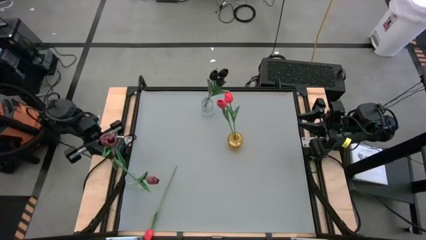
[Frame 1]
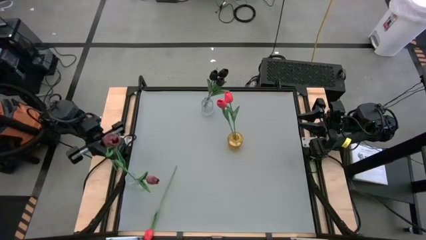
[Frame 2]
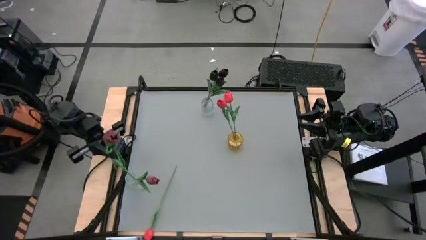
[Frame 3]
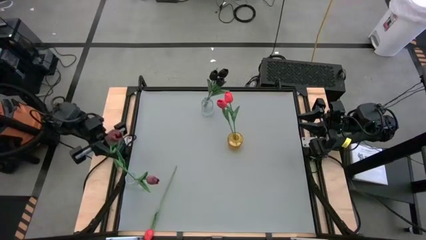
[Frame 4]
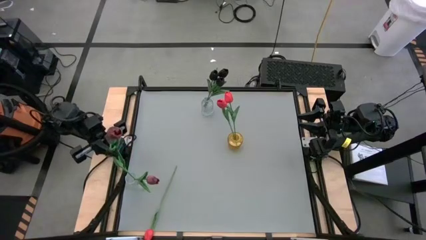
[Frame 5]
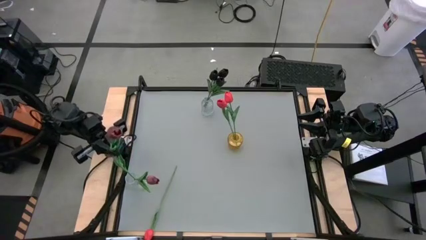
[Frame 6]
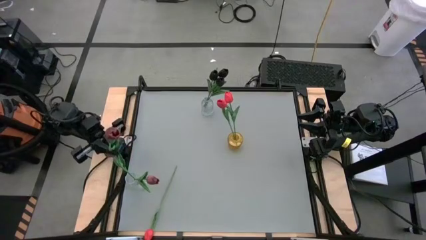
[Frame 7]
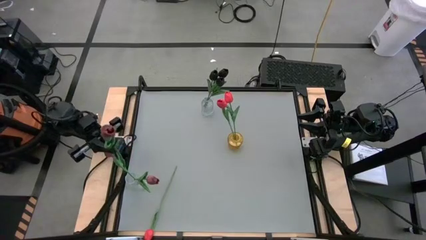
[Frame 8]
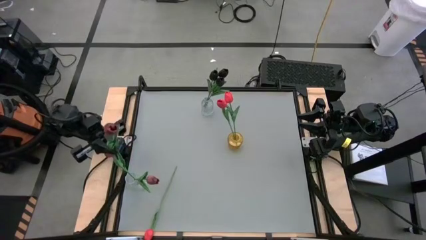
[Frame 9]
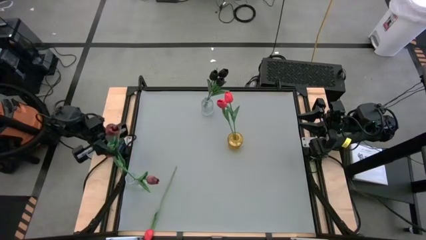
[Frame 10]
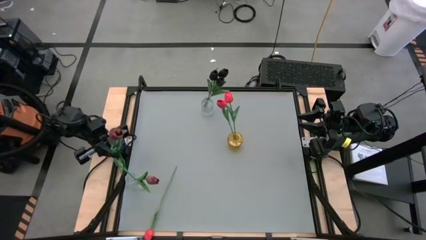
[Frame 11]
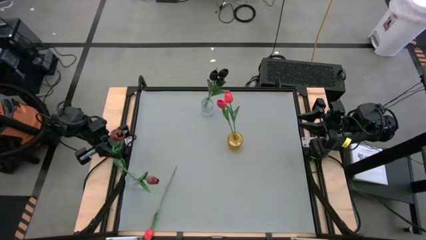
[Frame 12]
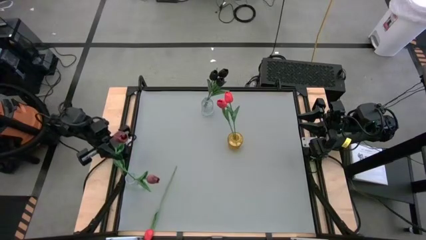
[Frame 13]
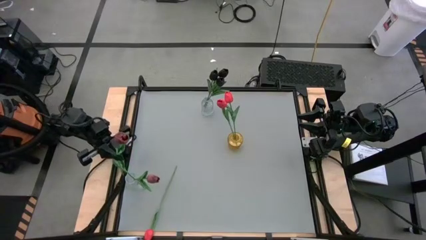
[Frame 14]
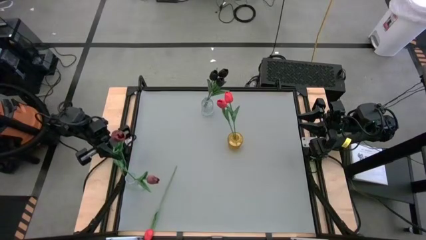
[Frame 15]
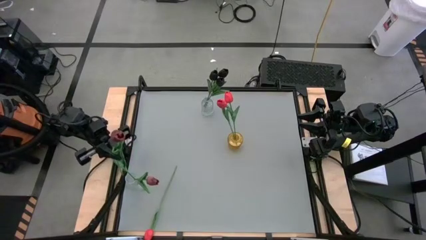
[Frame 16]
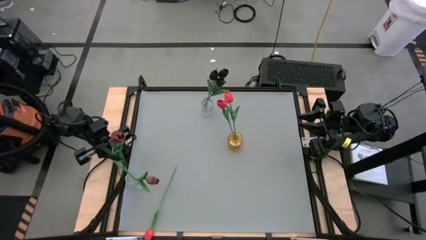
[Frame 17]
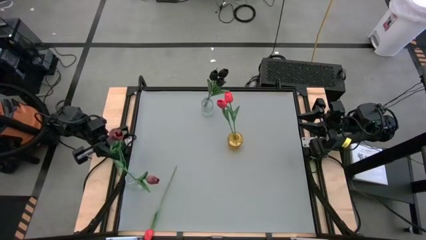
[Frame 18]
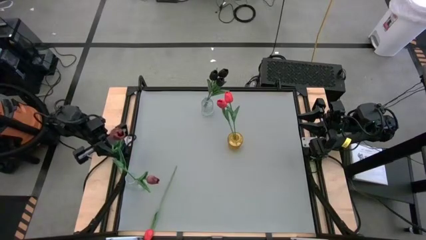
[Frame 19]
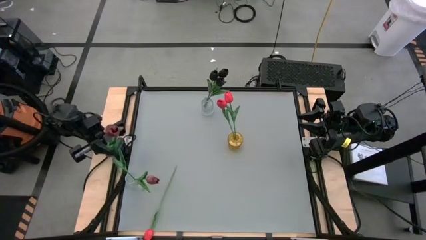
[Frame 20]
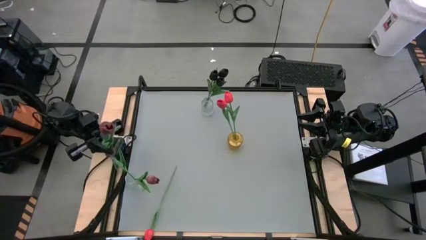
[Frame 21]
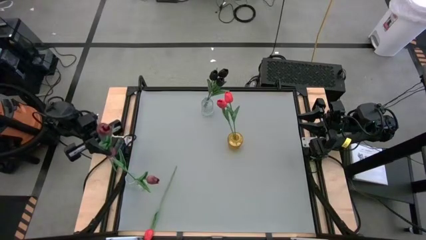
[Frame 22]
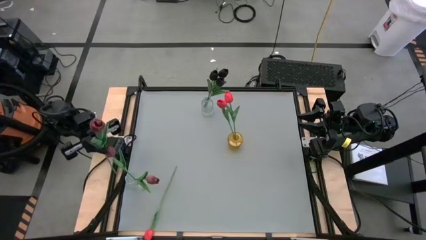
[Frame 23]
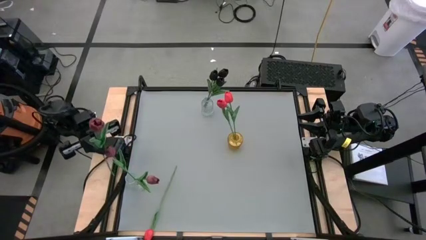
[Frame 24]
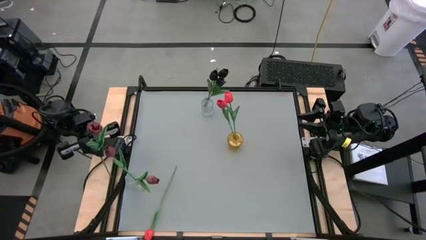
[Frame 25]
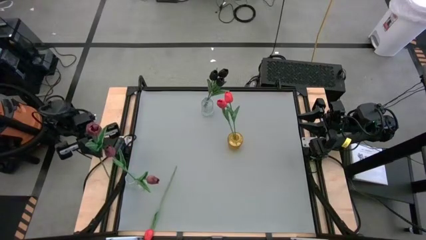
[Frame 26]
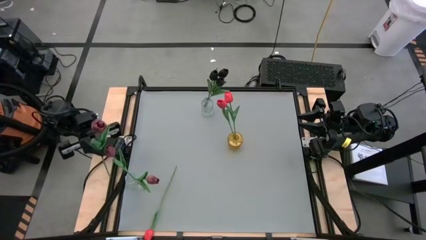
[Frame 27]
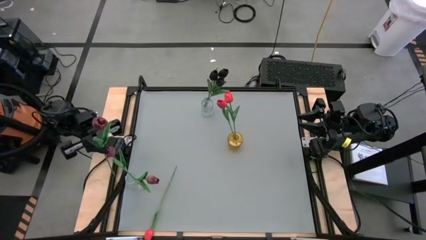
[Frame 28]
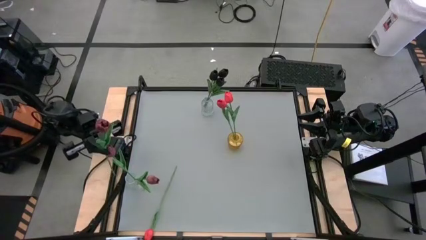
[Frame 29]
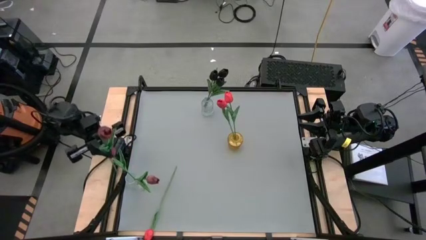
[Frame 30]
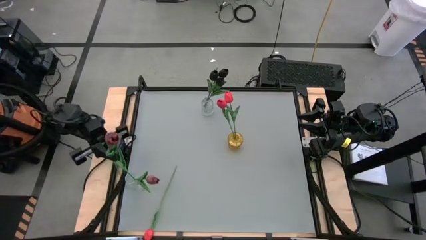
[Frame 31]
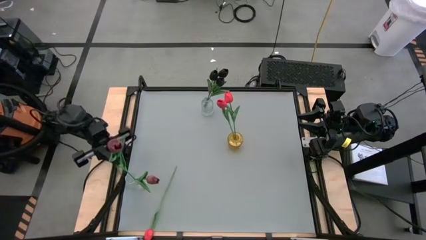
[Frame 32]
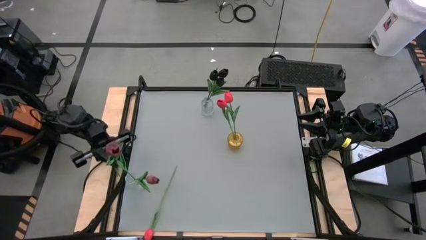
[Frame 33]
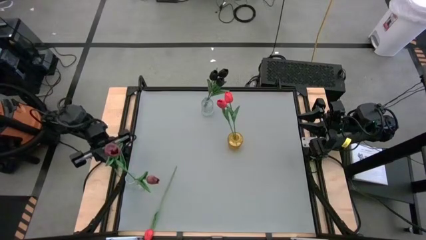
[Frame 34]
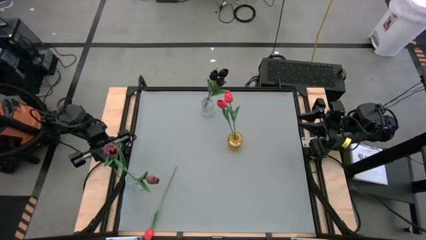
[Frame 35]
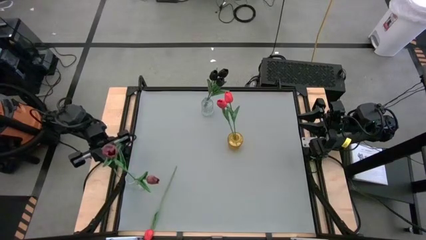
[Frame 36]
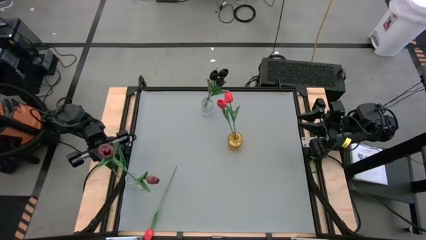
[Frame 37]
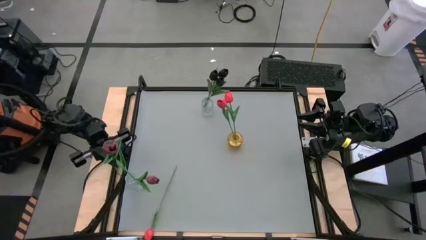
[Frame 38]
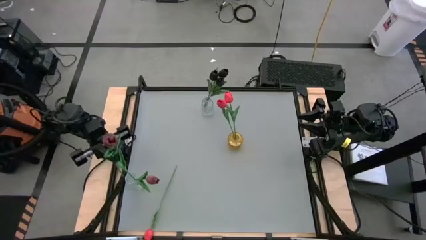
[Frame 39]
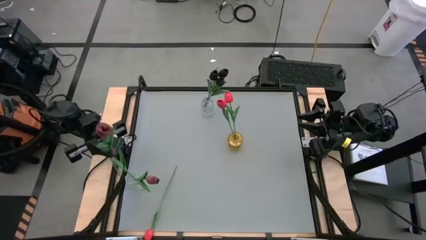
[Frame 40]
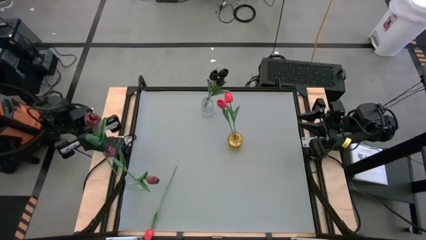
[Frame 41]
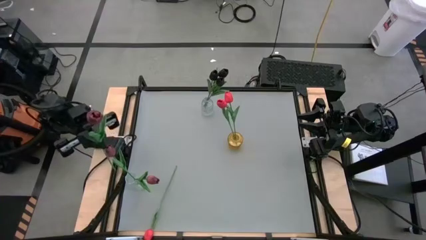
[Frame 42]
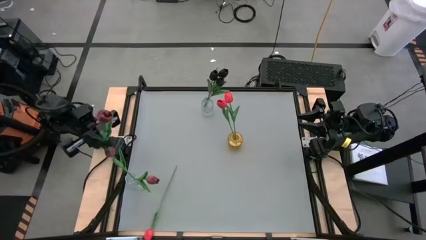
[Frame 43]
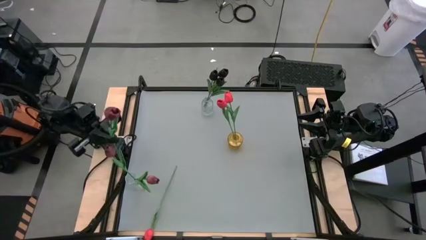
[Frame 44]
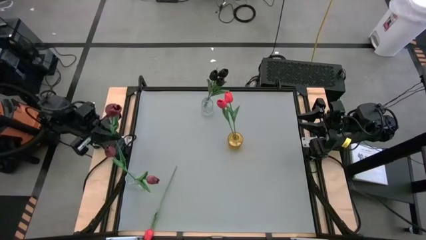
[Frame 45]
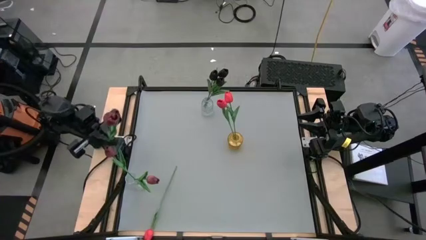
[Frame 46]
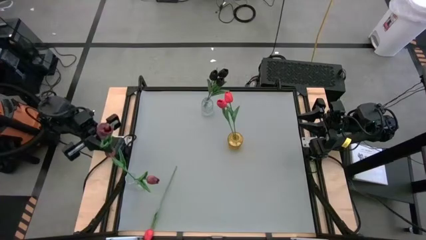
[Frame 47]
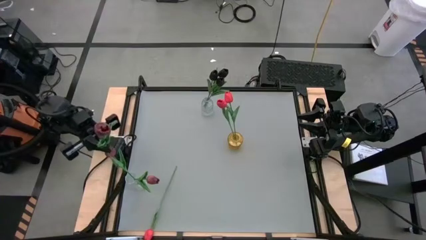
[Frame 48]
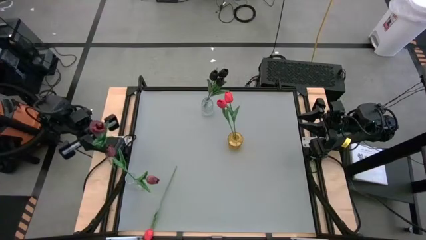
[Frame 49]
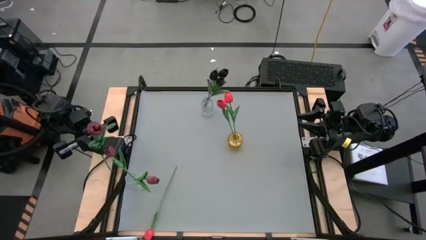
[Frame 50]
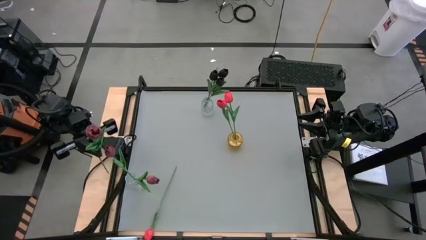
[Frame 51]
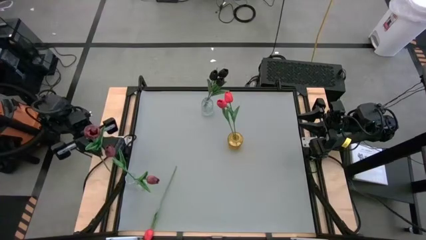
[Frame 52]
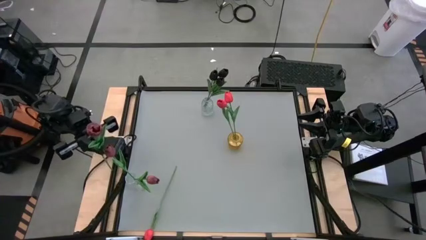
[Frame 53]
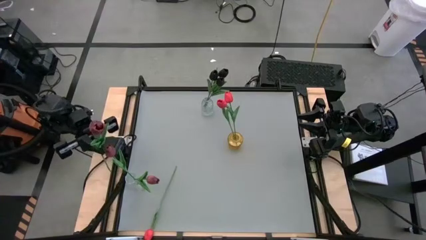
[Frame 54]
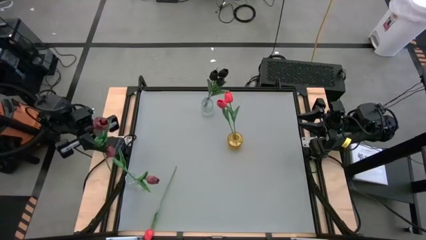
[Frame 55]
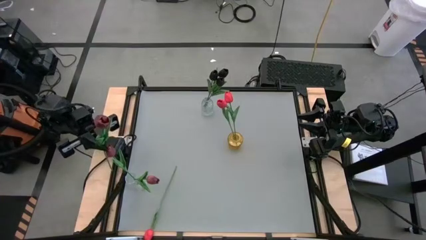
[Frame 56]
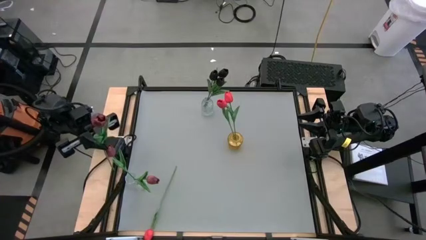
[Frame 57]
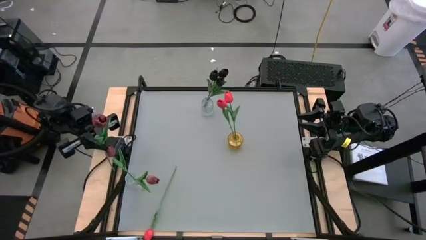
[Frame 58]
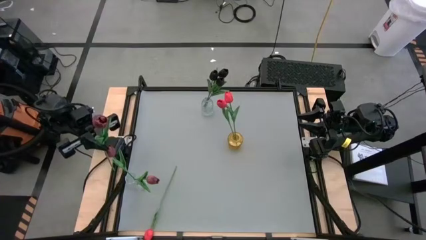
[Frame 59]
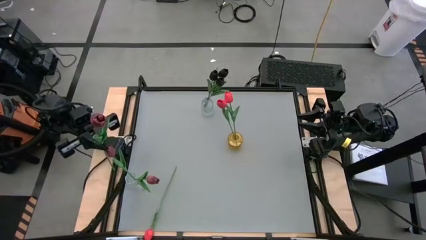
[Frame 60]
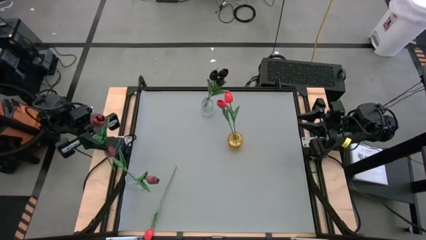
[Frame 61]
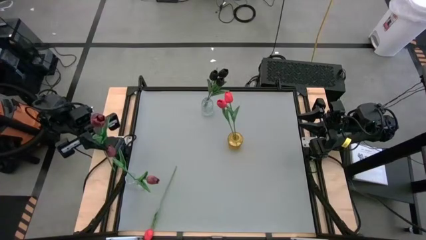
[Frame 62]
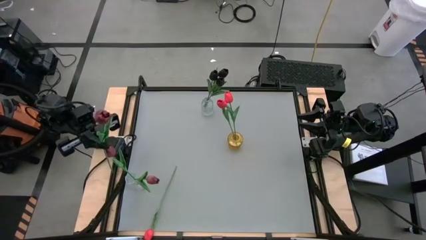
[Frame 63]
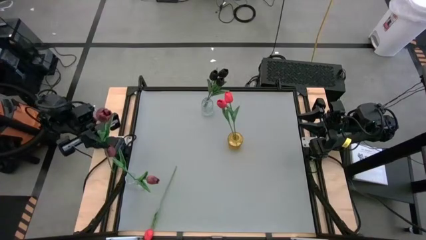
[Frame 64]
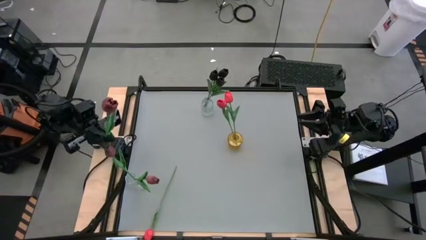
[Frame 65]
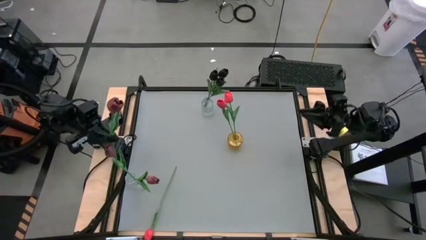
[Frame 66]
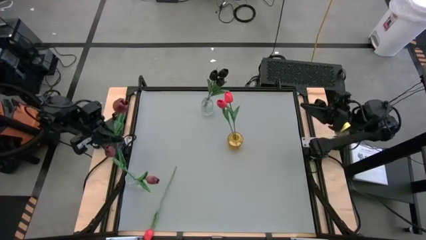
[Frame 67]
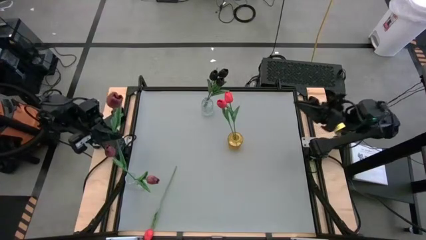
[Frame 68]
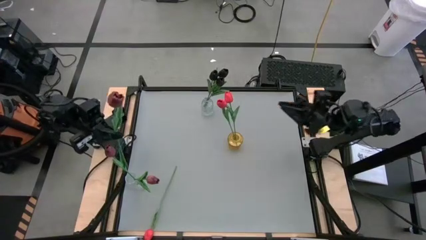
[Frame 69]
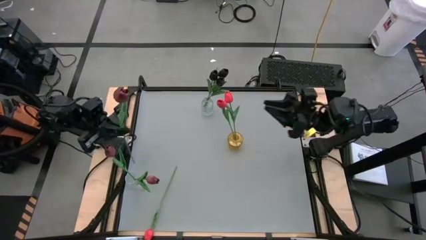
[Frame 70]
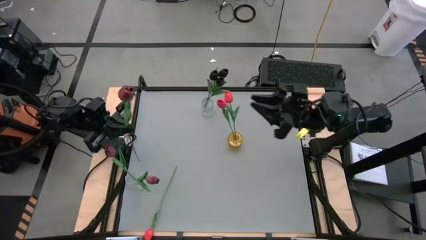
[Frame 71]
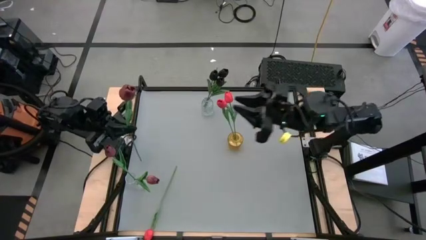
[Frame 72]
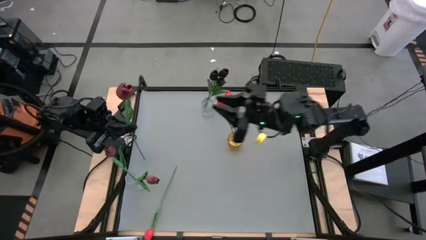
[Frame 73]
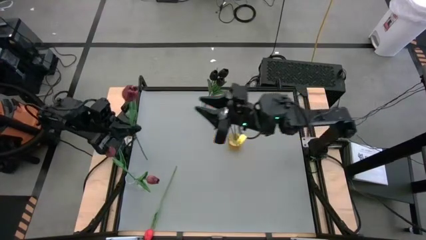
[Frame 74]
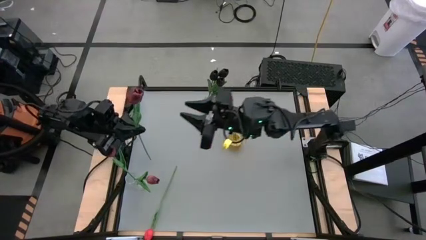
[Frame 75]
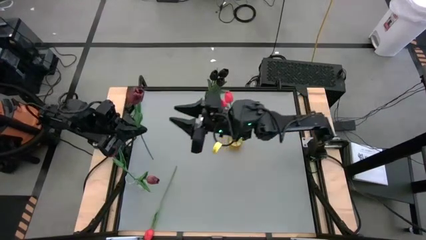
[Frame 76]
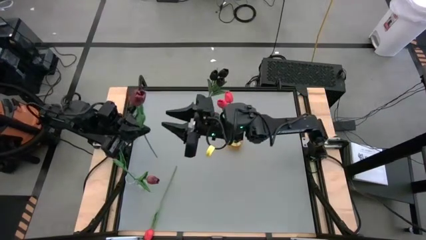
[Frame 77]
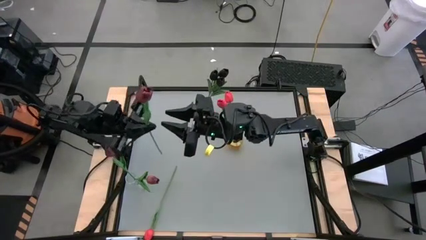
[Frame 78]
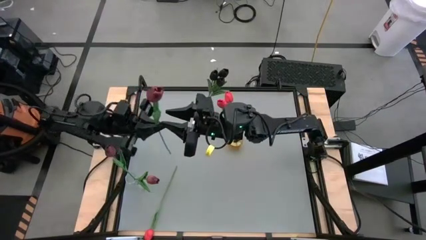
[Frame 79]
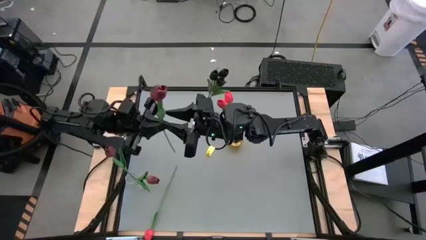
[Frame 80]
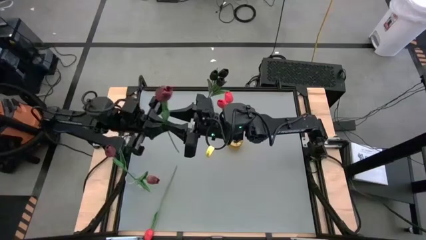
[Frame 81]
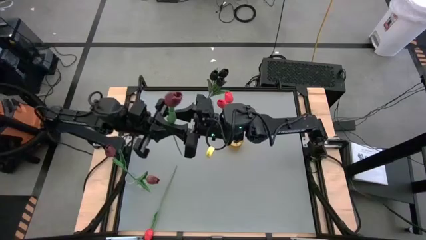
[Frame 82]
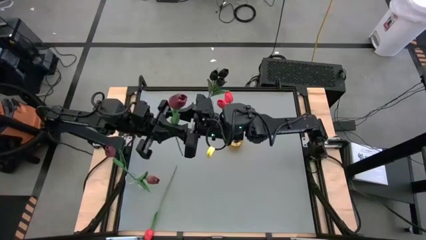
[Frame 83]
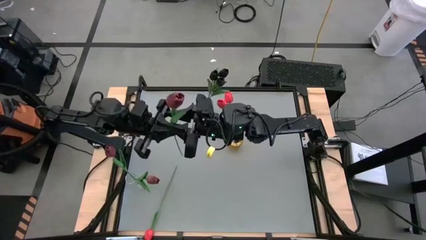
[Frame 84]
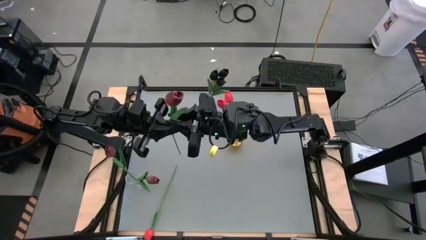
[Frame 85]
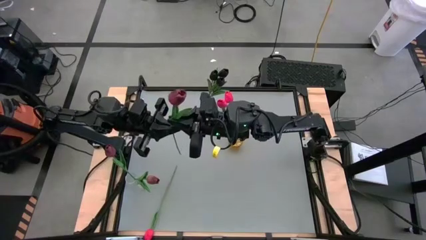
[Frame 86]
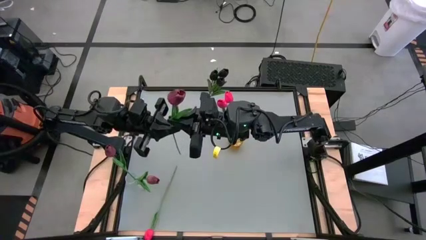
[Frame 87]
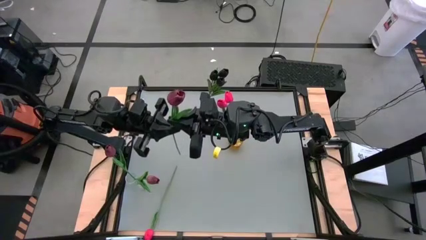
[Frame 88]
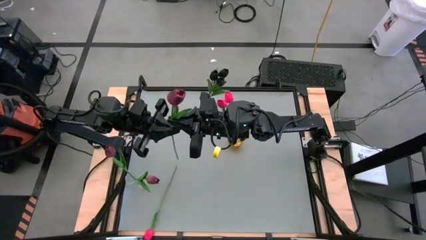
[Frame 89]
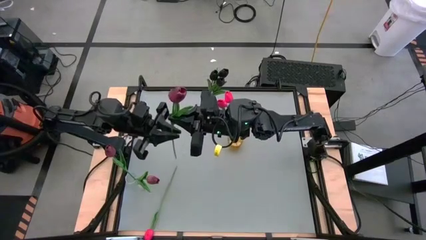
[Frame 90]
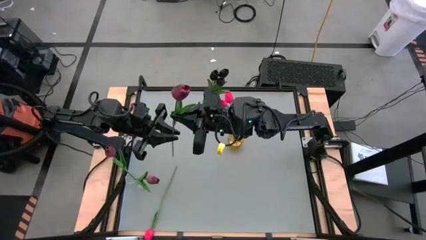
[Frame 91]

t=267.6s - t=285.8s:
Task: Sort flowers into vase by color
Put the red tulip into the bottom transparent bin
